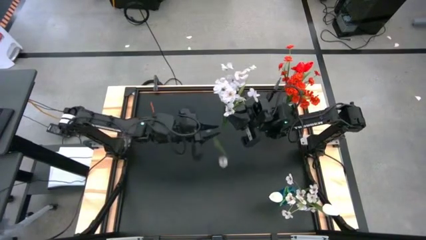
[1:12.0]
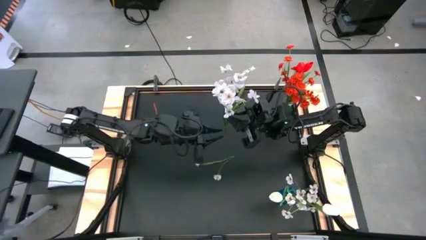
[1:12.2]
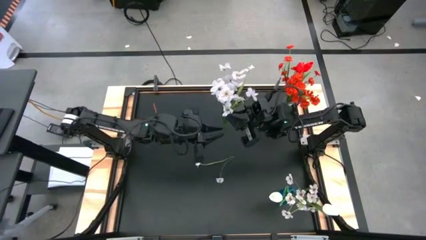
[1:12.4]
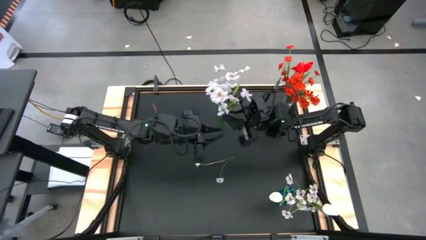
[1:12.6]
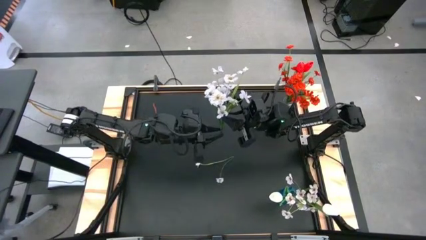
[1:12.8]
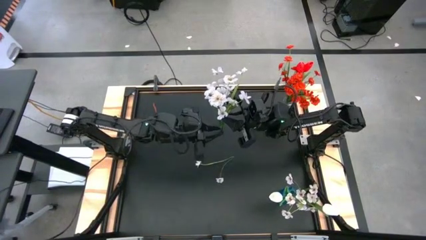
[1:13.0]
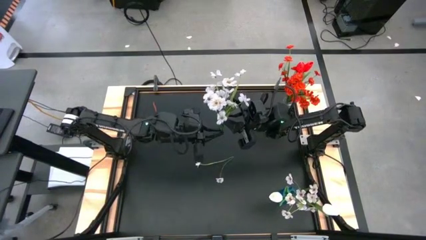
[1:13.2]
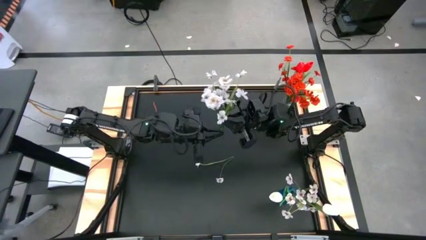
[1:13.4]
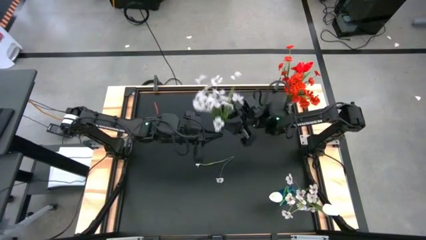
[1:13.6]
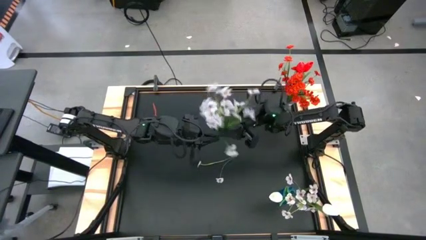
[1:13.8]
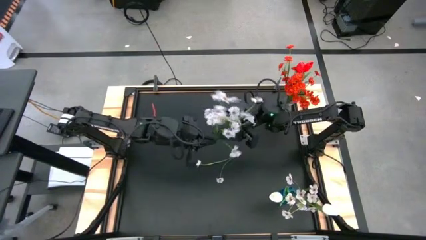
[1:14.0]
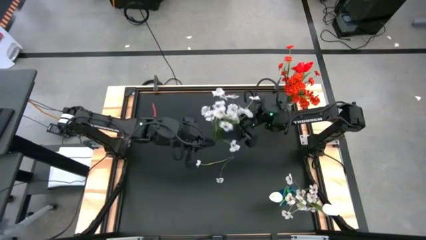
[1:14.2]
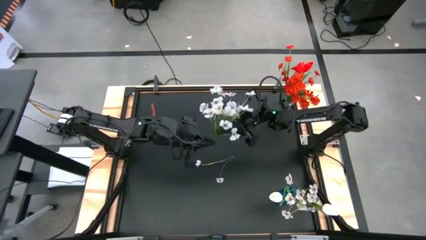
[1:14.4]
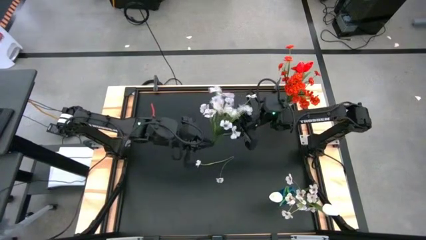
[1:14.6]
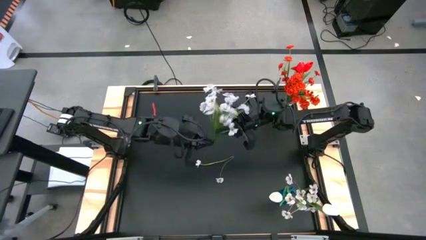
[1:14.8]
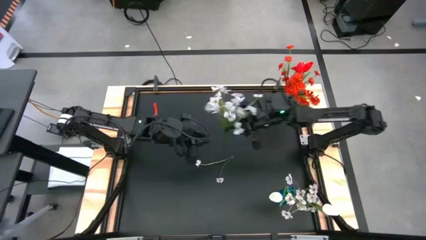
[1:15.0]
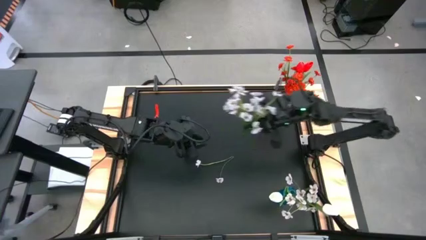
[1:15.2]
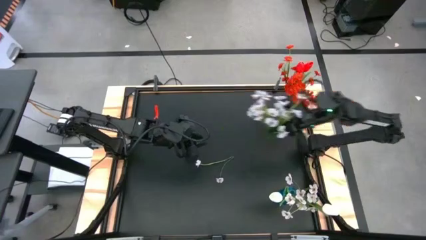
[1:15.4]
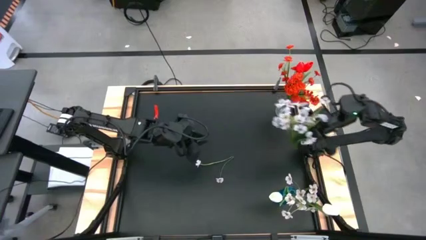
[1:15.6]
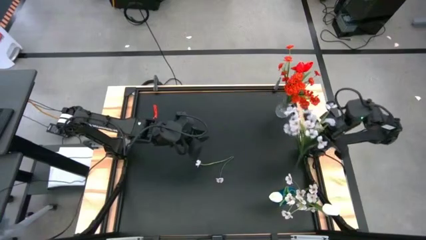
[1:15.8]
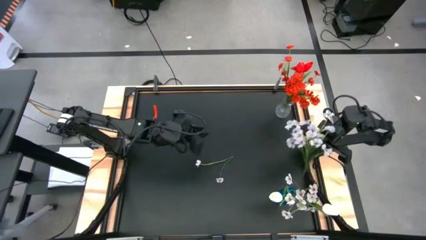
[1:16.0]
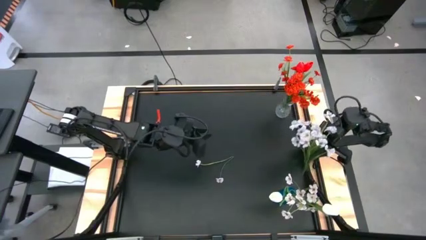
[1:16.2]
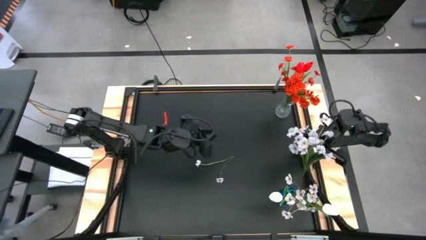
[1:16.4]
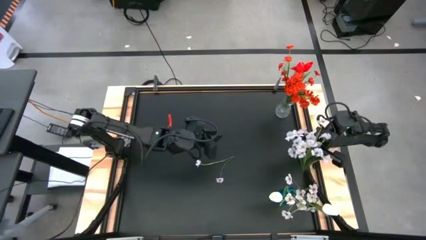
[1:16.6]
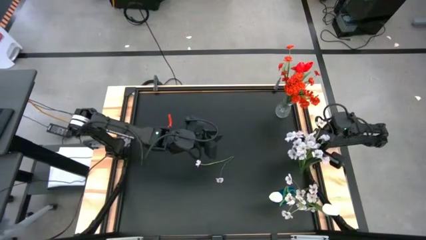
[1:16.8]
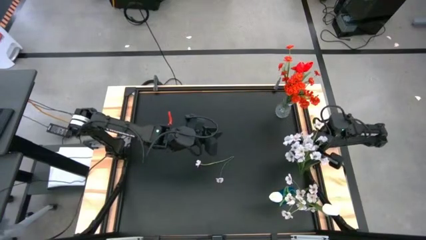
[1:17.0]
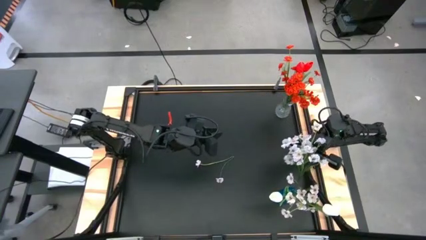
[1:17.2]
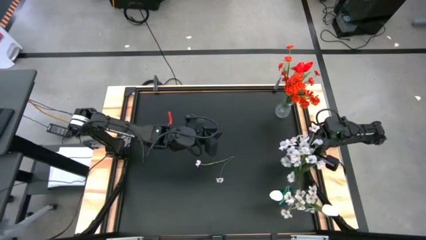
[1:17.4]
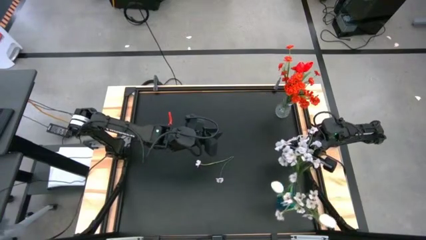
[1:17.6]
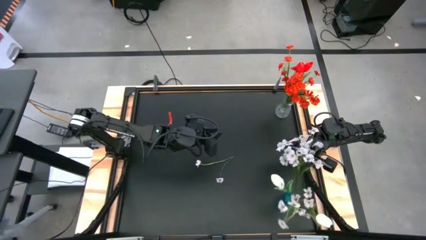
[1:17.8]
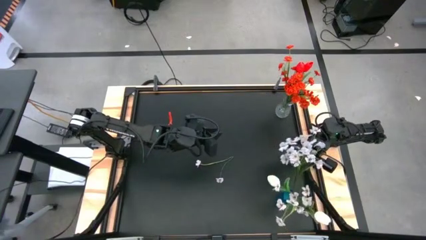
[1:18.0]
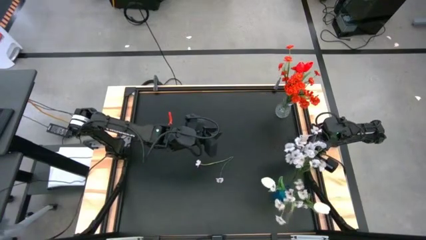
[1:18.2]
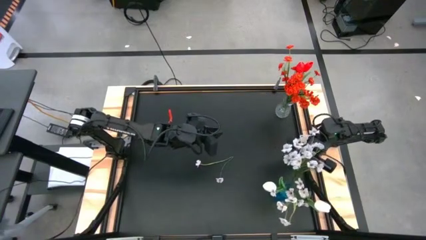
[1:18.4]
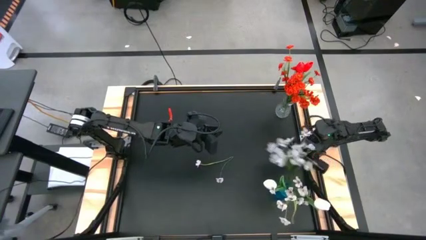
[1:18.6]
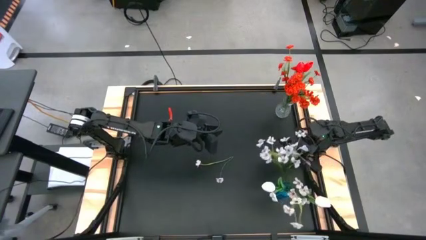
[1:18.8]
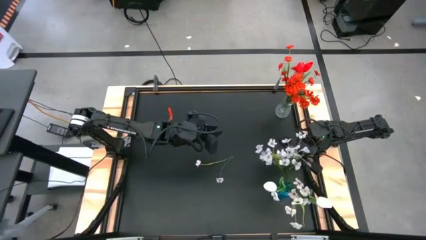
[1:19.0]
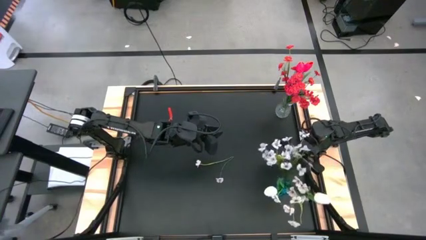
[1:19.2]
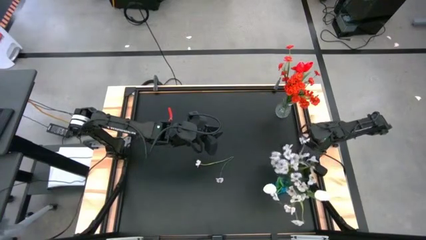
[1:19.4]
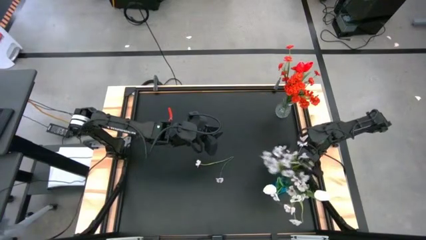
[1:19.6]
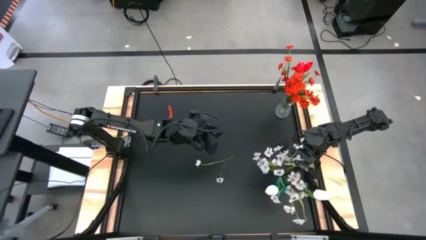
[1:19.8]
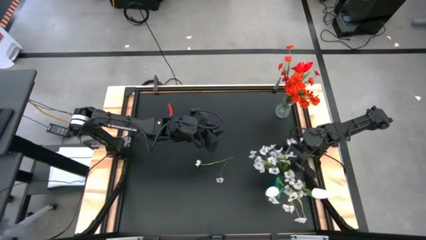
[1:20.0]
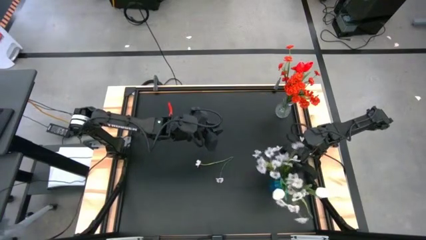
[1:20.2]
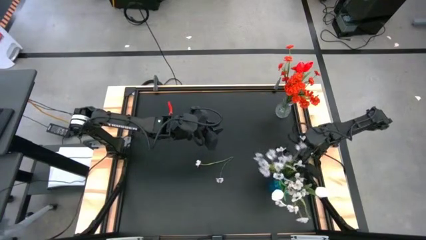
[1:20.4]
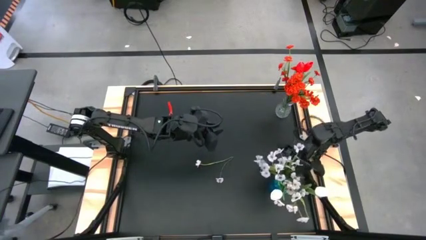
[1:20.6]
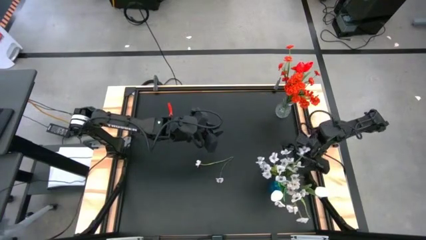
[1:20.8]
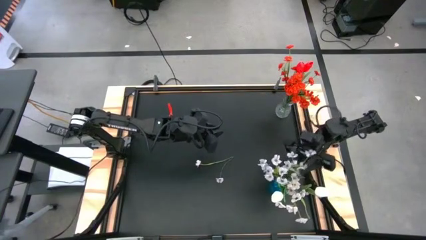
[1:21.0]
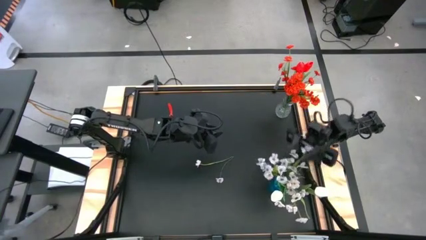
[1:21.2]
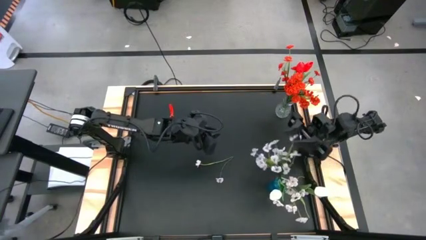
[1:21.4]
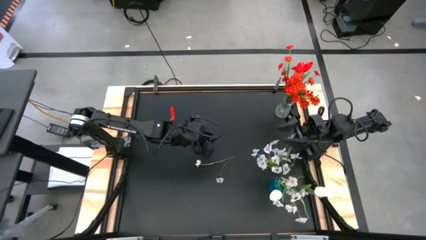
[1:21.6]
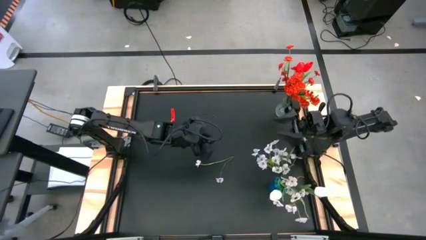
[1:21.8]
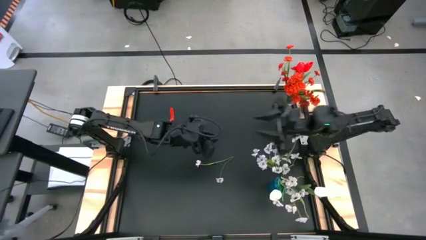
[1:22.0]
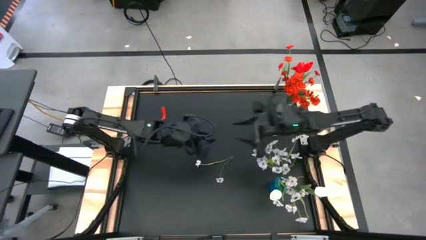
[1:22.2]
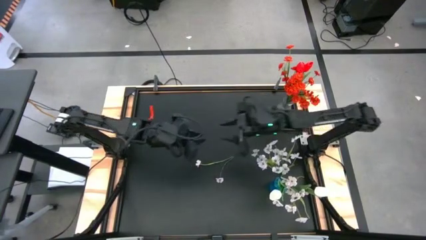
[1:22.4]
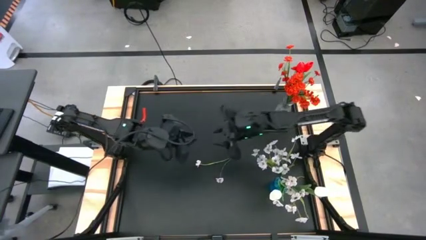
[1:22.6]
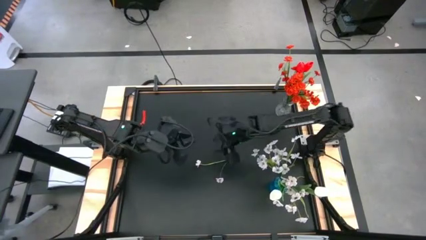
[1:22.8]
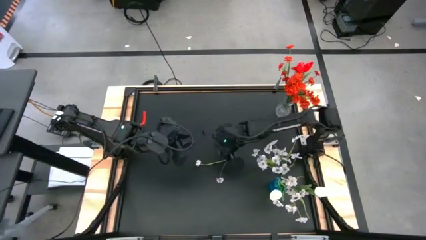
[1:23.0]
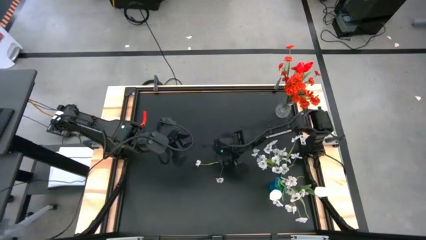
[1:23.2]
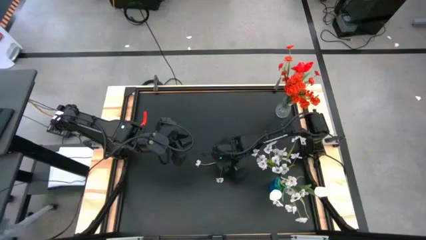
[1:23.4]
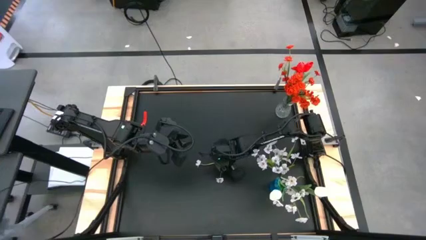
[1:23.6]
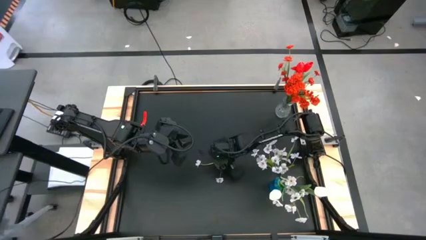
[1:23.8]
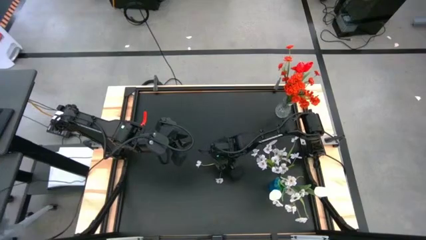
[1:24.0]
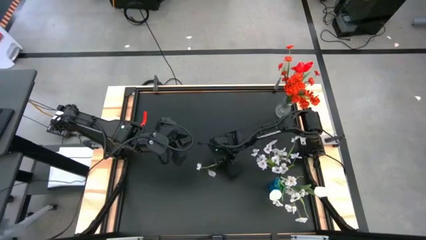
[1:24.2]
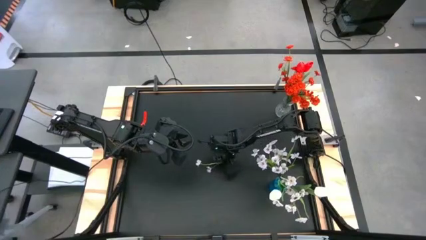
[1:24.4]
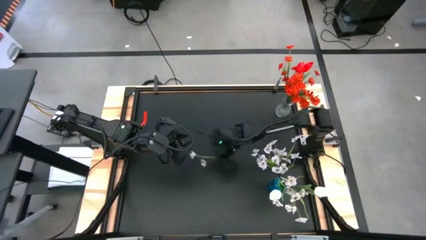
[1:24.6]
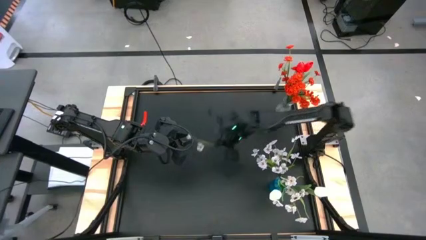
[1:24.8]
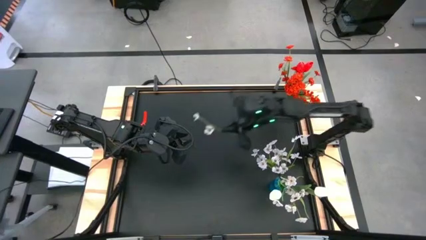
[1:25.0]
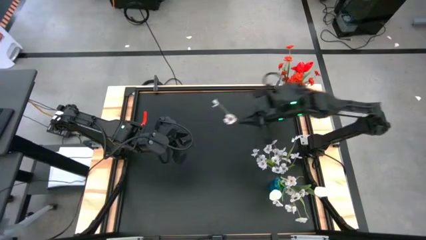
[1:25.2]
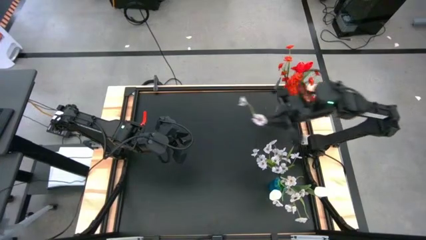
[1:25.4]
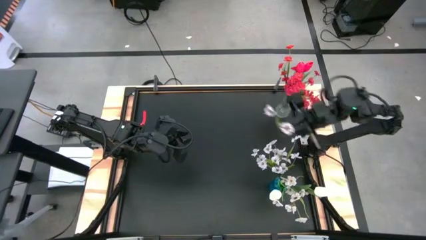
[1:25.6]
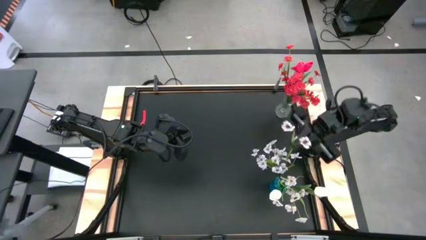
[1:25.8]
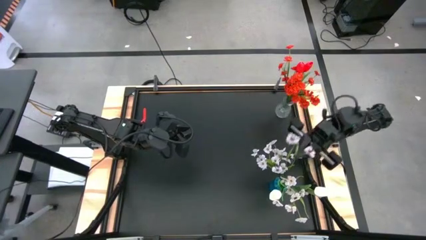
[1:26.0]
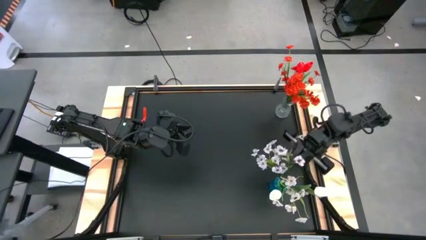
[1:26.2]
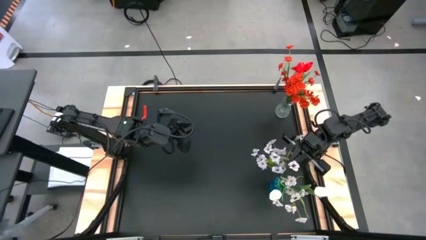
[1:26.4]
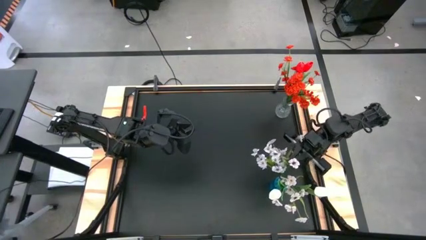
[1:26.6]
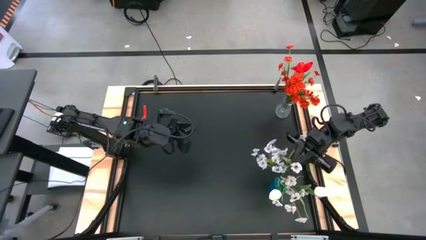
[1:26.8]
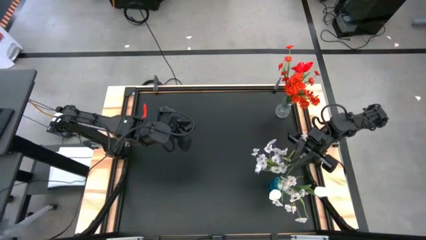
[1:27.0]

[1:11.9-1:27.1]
Task: Sort flowers into vase by color
Put the white flowers into the blue vase

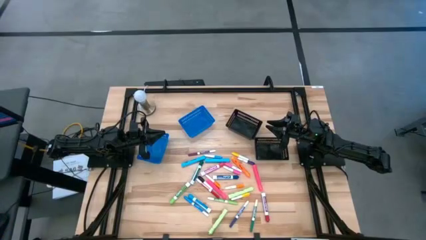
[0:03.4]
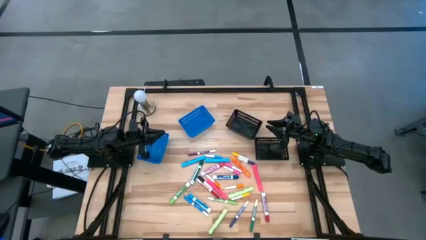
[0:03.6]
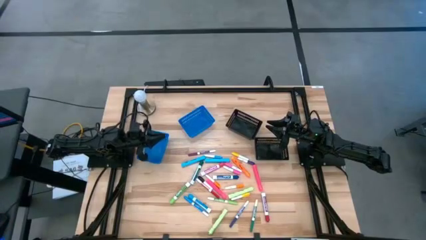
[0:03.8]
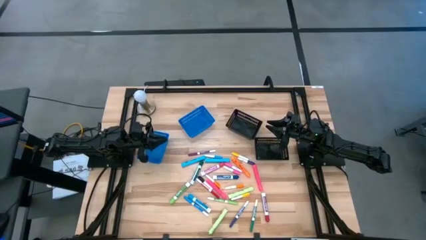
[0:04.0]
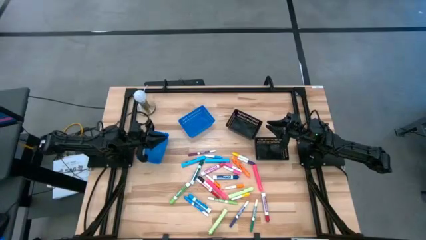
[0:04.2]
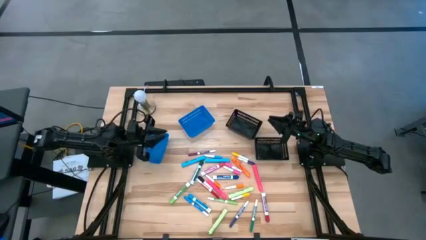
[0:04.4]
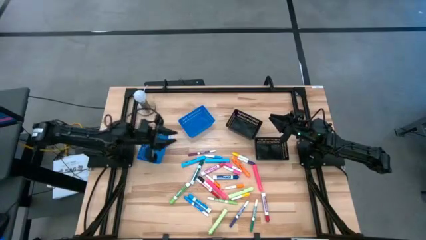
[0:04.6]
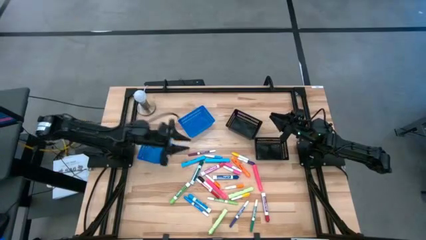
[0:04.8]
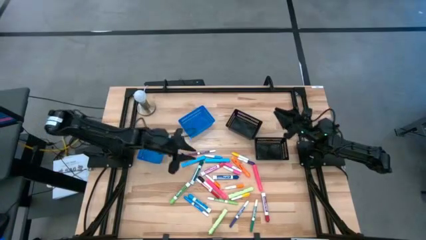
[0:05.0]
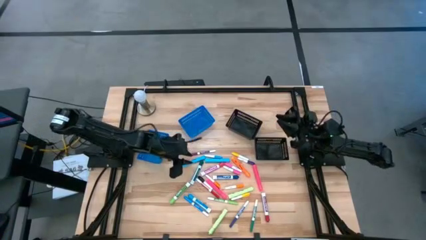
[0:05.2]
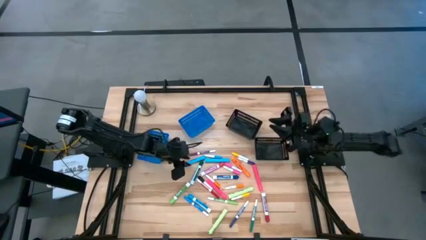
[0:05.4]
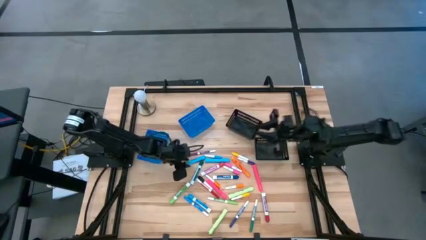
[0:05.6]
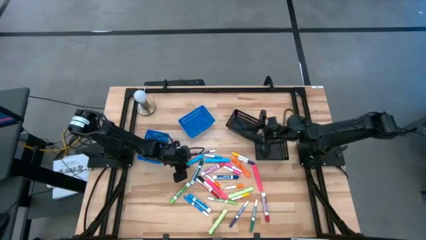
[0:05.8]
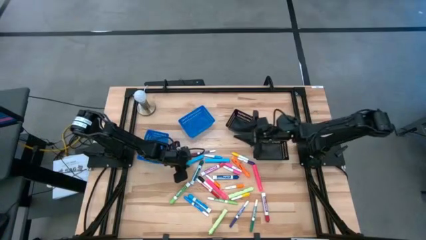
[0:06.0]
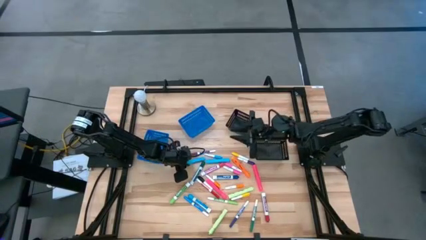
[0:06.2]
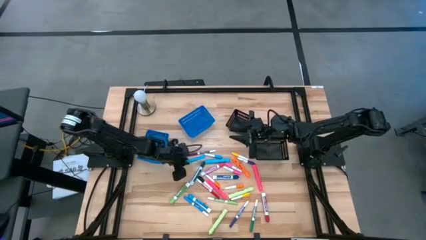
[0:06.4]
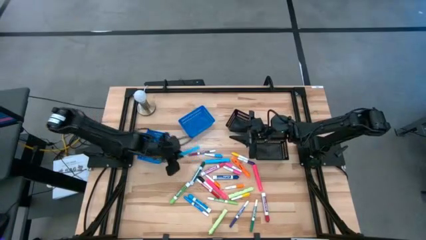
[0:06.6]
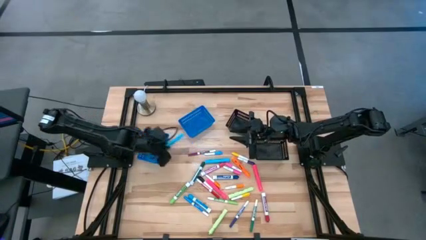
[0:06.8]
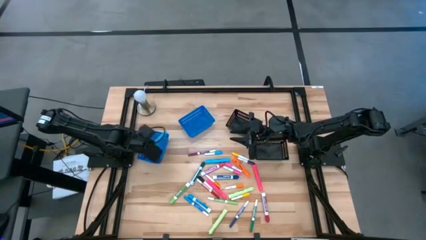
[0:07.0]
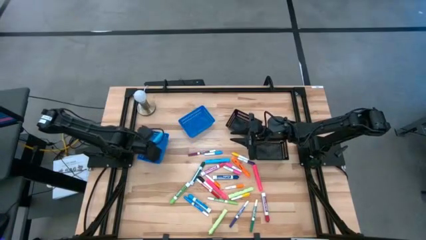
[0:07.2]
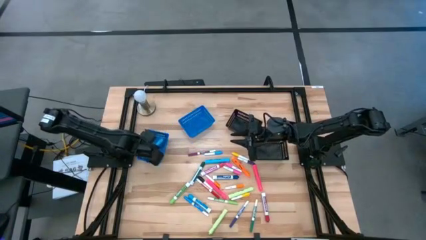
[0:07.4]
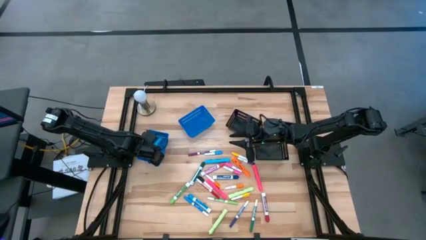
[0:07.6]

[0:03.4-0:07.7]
Task: Pick & Place Markers
Put the left blue highlighter pen into the left blue bin
